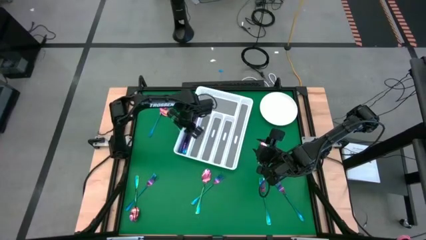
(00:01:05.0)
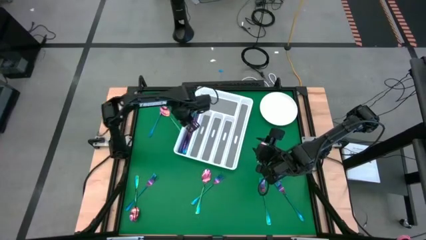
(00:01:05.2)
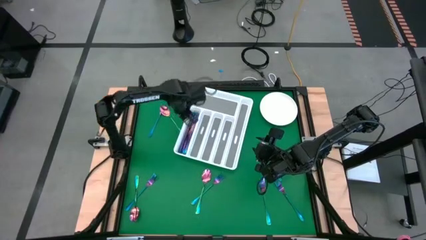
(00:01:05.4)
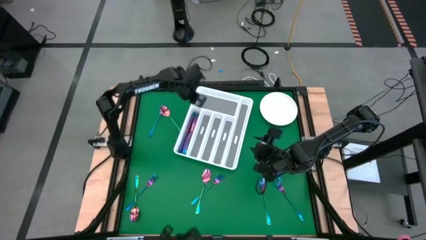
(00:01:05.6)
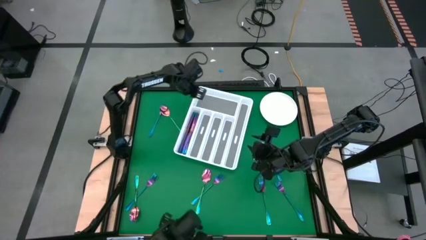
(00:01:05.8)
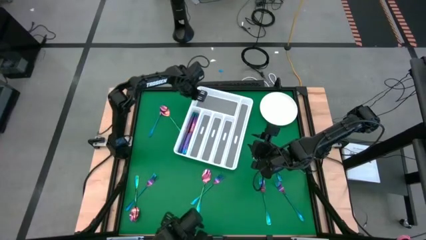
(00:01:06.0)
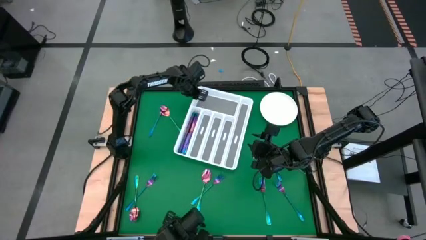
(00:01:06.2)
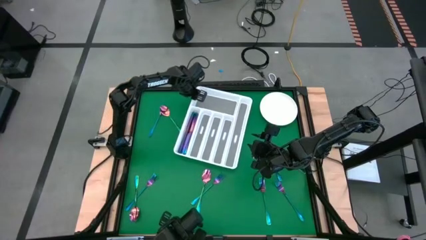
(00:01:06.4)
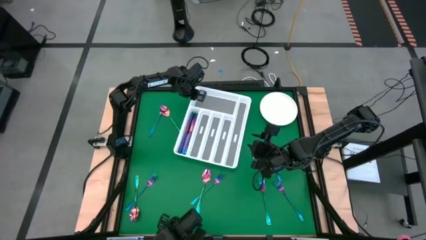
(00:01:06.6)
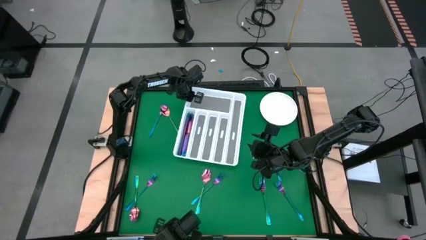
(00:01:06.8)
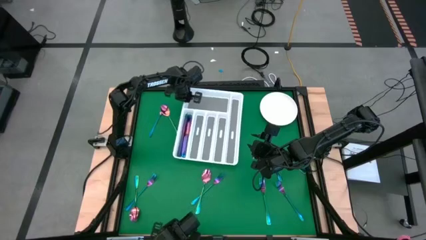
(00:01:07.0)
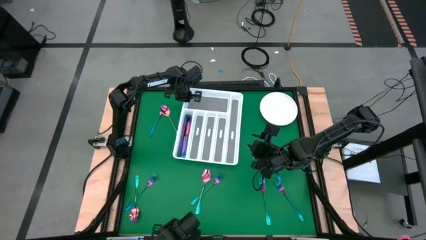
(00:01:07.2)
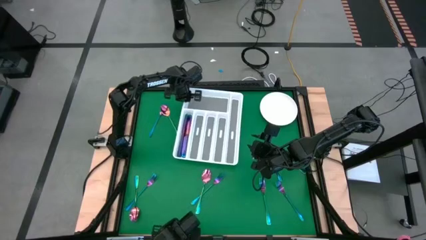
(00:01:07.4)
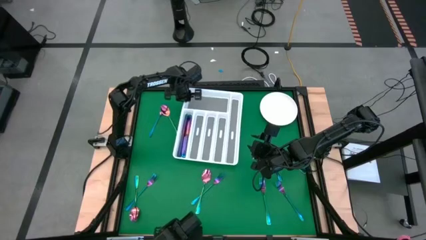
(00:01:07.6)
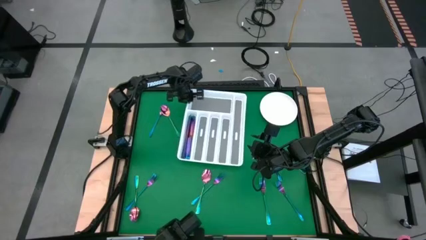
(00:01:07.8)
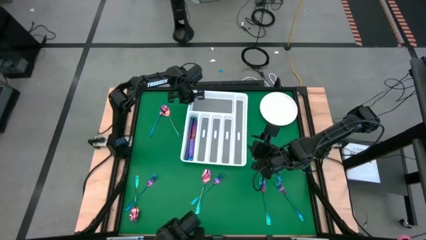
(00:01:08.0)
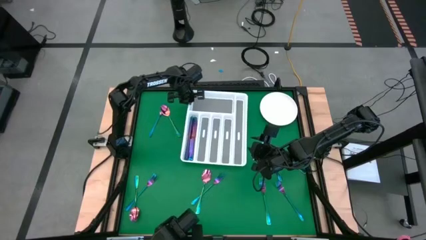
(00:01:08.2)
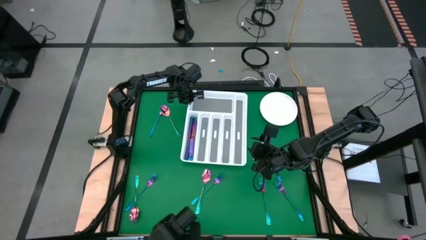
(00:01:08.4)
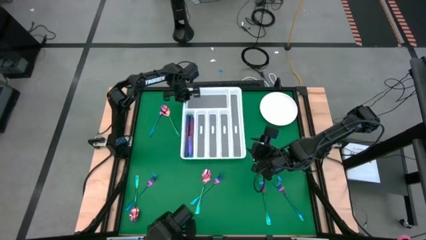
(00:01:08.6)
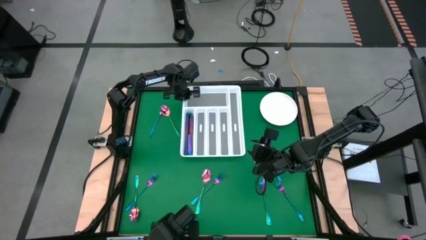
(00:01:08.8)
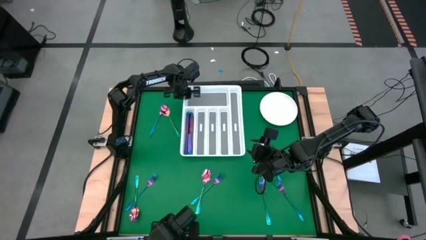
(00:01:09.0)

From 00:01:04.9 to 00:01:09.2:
Task: Sort silverware
Adjust the silverware tray

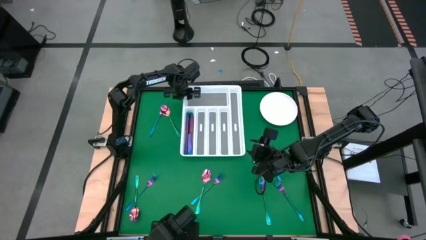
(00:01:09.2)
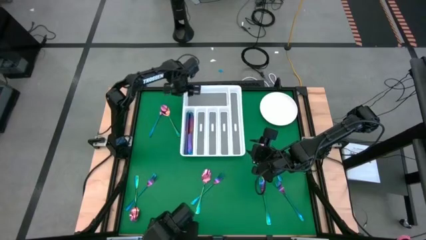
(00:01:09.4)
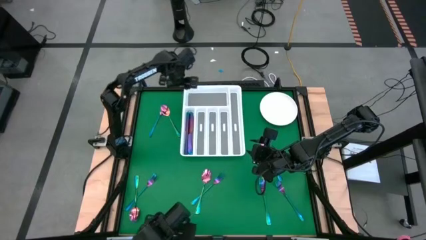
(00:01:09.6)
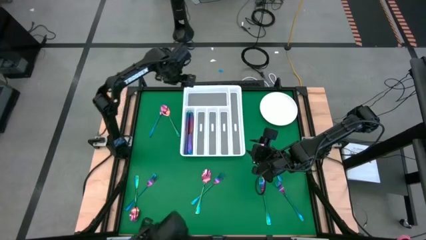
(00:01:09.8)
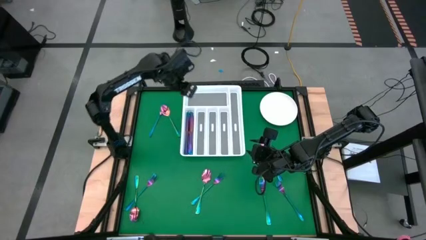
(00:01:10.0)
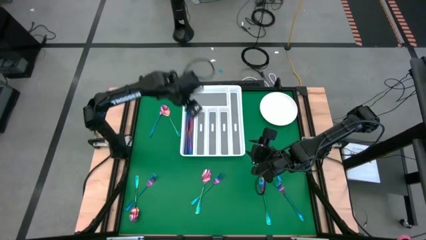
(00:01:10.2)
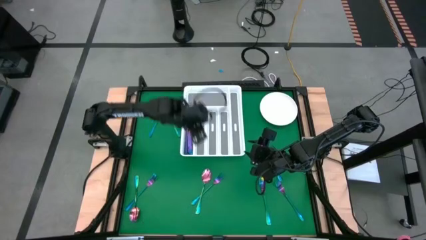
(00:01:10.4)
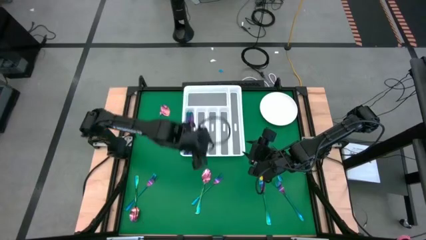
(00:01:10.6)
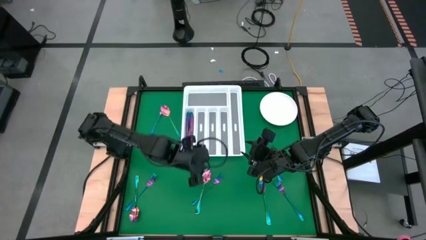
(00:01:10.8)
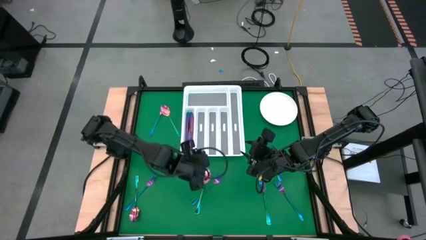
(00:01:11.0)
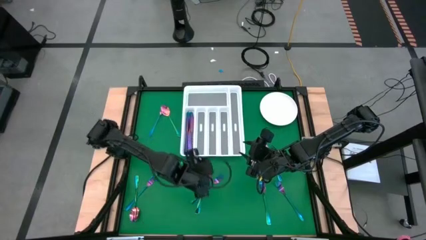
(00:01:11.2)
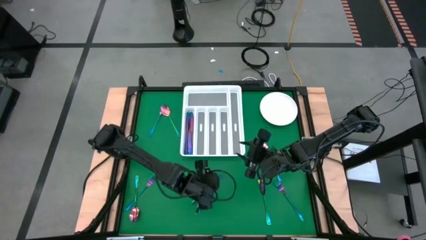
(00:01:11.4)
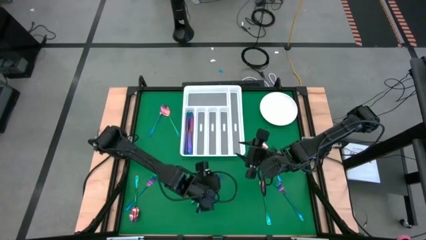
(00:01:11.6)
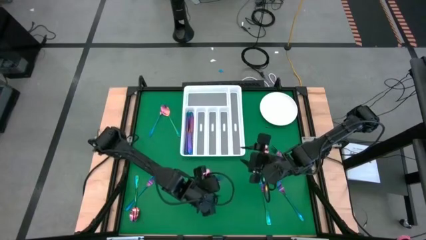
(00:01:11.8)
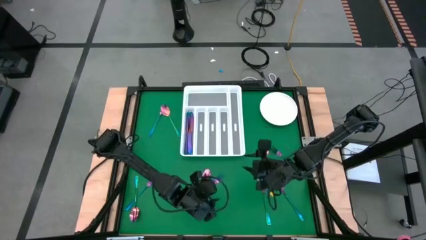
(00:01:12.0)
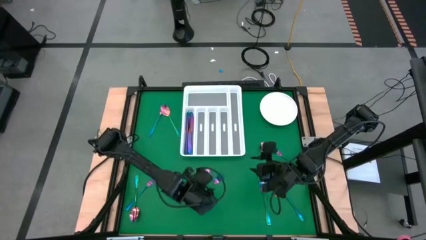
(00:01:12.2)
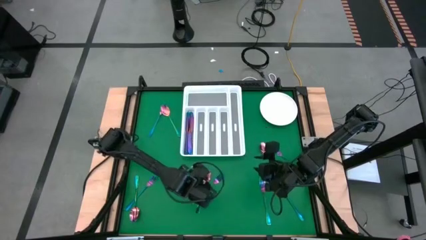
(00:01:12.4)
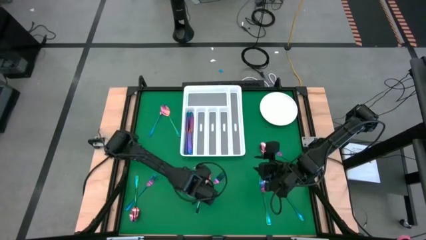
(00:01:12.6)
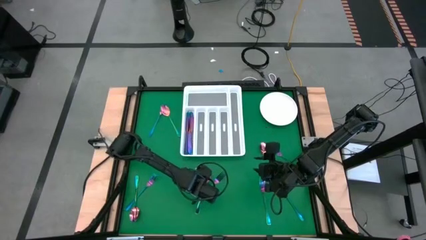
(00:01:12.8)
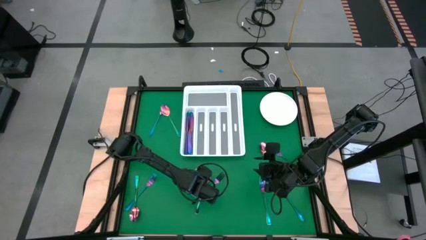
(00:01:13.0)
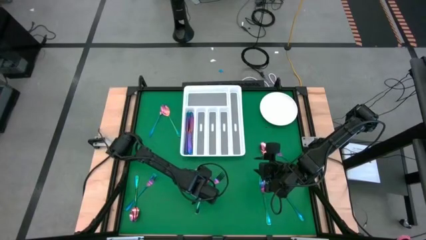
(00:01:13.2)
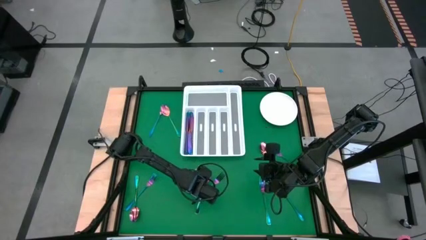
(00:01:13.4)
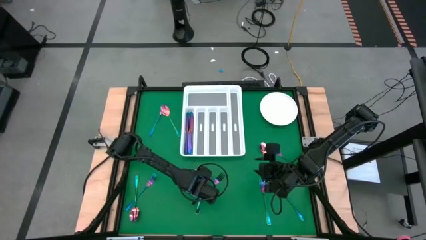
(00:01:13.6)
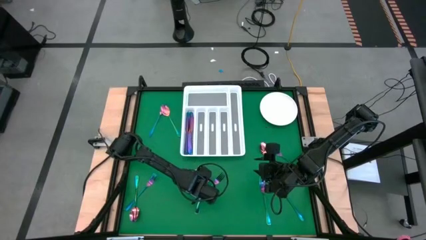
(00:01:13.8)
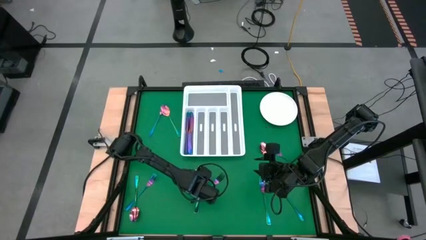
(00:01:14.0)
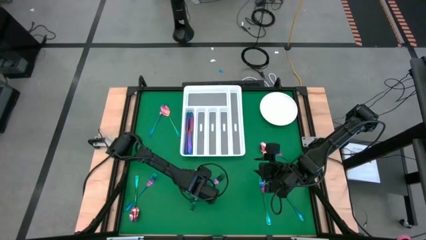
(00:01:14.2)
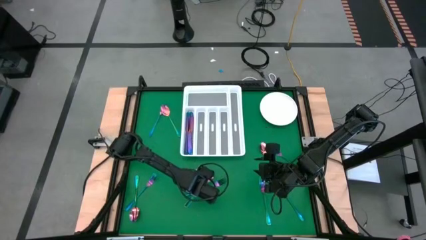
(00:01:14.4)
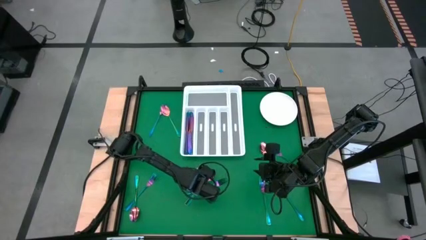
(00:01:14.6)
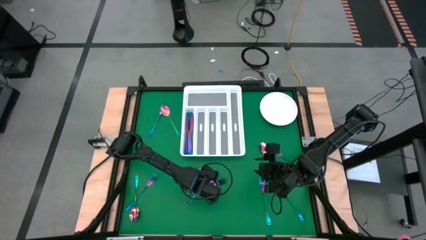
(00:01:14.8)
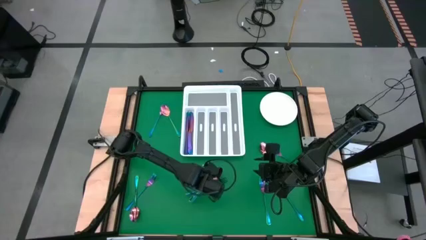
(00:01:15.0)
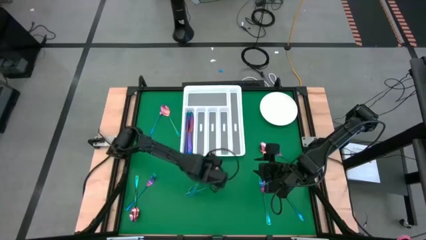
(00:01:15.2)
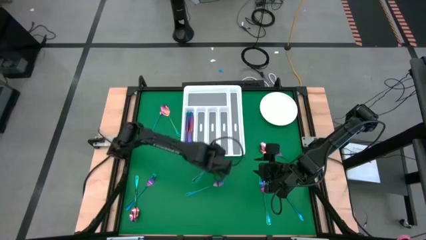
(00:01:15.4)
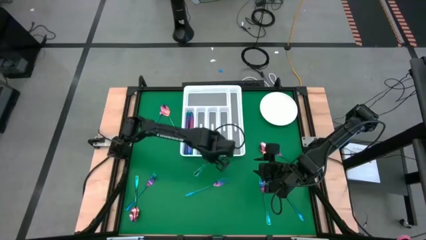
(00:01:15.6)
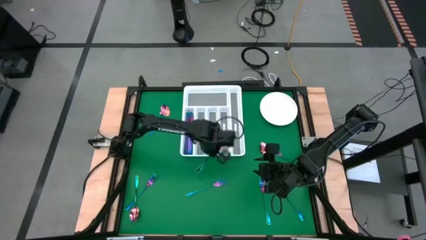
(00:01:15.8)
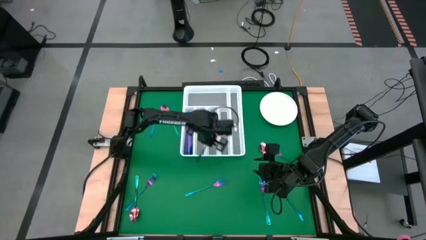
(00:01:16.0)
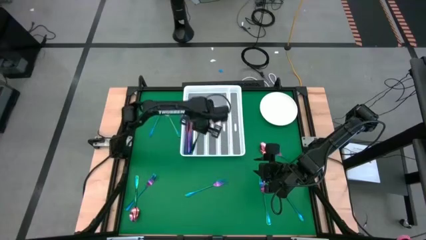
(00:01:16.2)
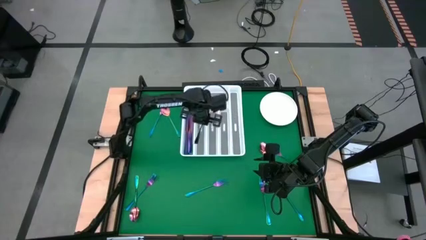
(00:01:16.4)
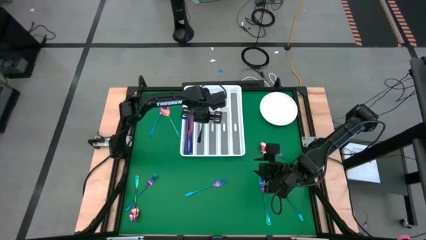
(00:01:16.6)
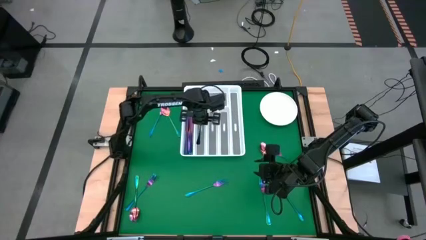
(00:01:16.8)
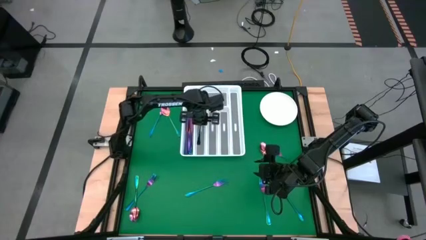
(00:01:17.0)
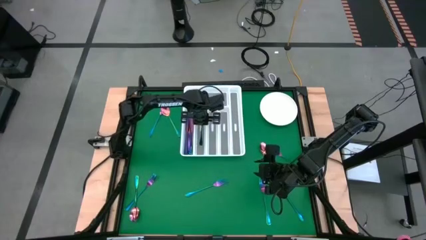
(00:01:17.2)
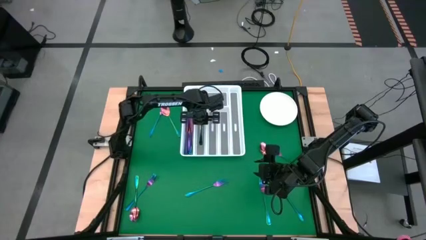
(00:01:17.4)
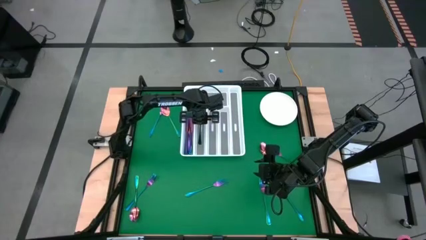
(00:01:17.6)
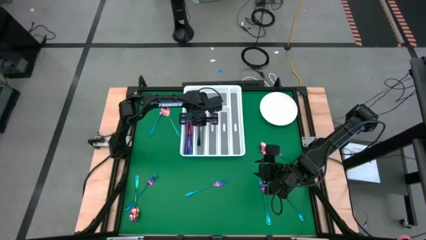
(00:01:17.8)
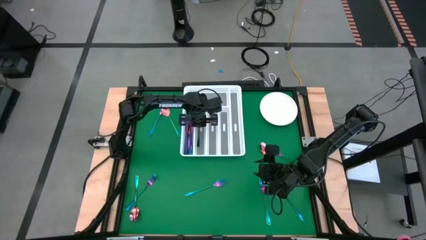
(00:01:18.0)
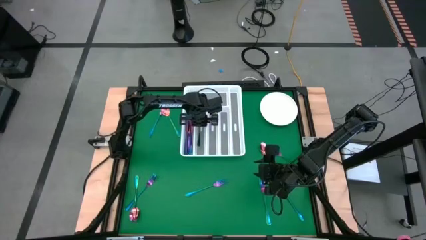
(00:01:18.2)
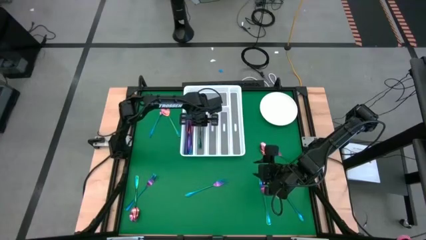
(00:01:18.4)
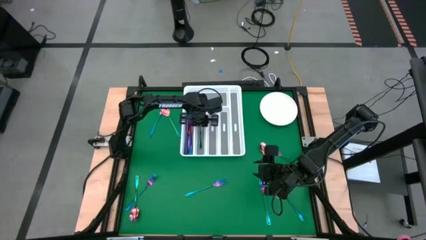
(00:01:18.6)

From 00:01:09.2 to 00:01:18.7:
Put the blue spoon into the silverware tray
